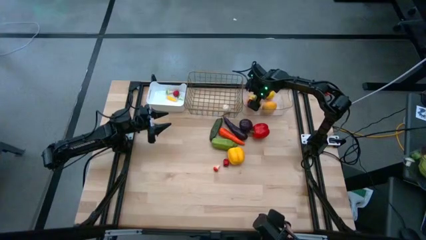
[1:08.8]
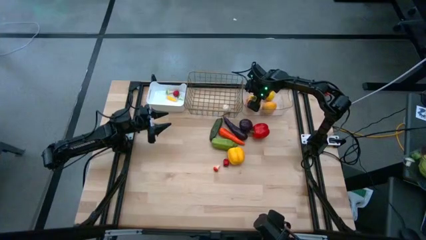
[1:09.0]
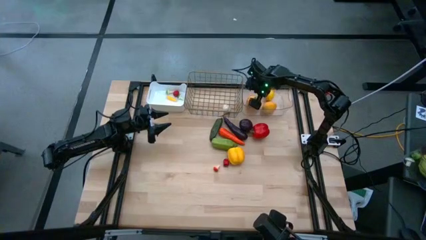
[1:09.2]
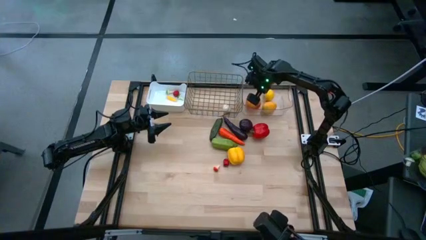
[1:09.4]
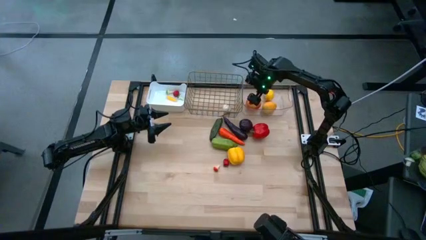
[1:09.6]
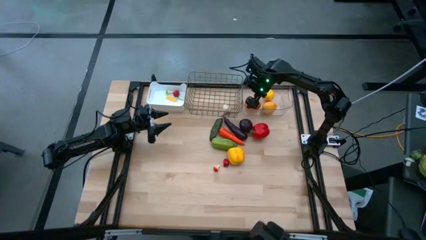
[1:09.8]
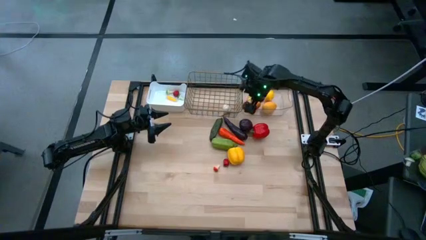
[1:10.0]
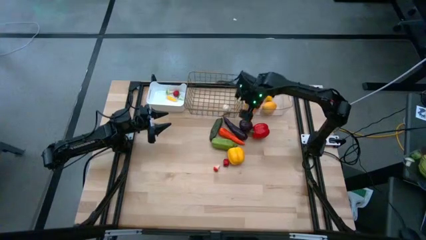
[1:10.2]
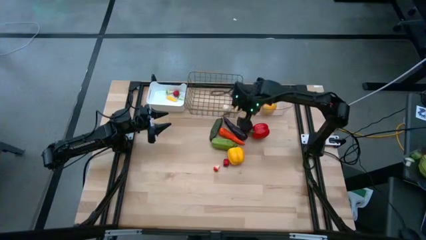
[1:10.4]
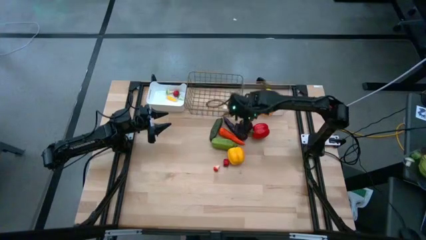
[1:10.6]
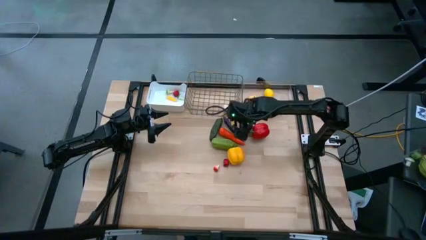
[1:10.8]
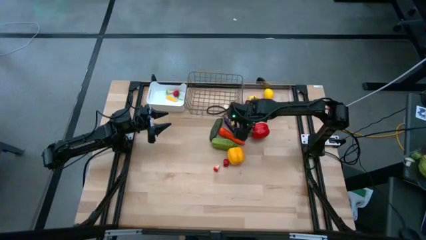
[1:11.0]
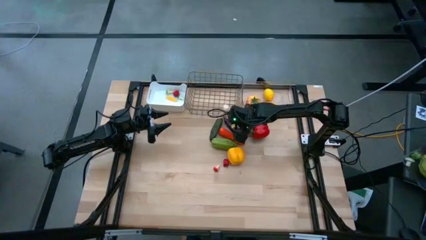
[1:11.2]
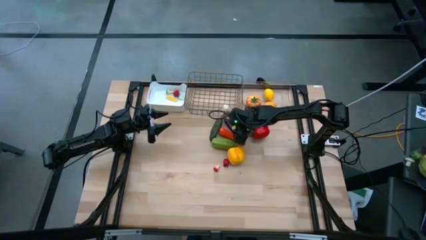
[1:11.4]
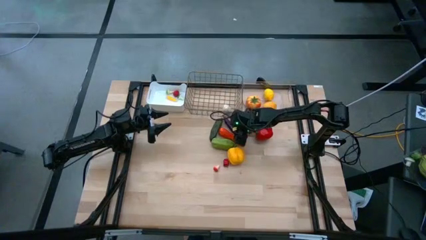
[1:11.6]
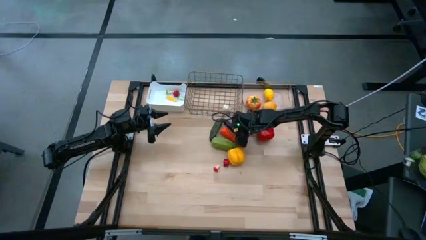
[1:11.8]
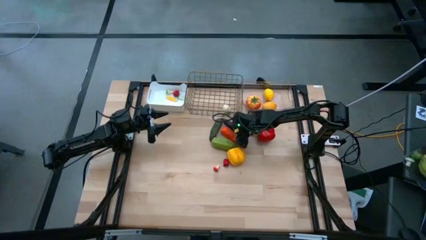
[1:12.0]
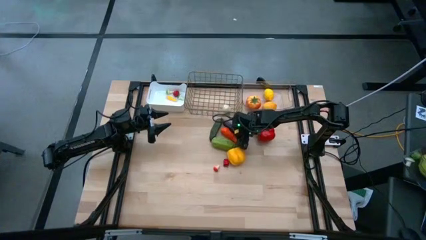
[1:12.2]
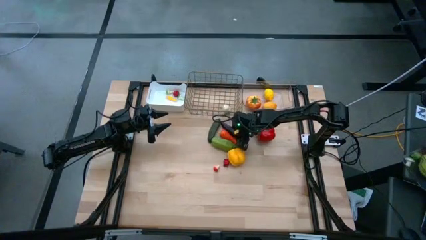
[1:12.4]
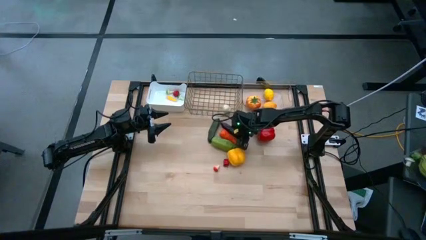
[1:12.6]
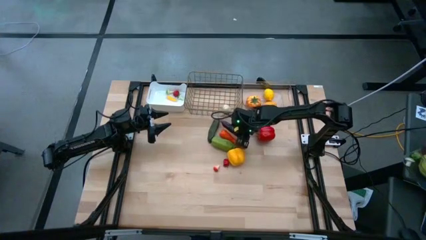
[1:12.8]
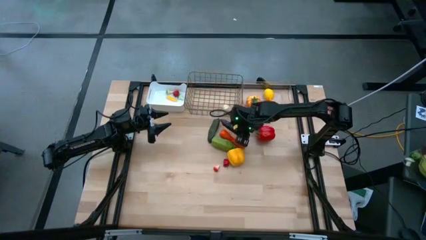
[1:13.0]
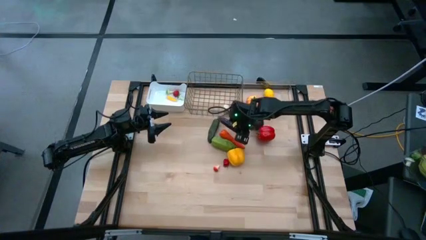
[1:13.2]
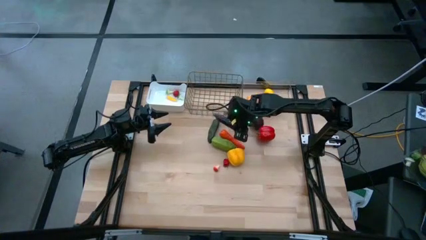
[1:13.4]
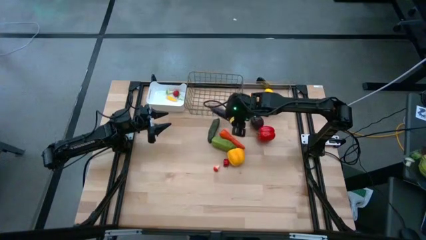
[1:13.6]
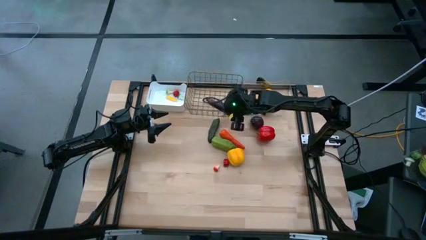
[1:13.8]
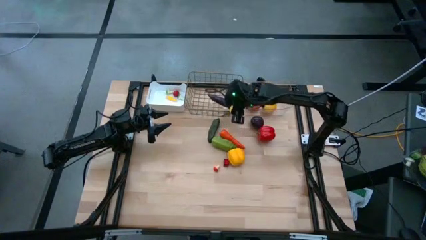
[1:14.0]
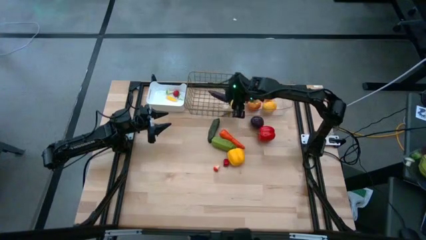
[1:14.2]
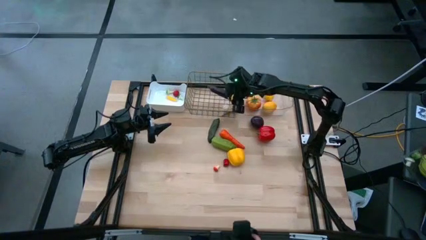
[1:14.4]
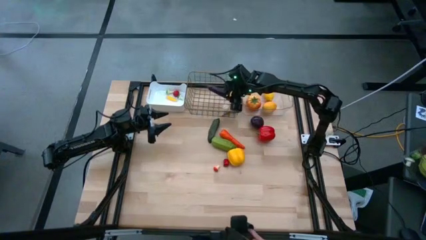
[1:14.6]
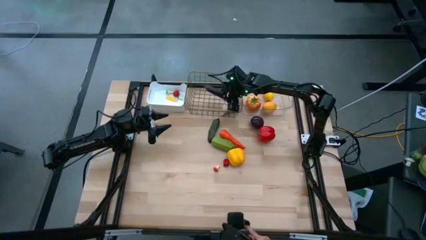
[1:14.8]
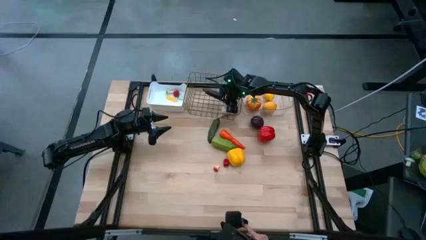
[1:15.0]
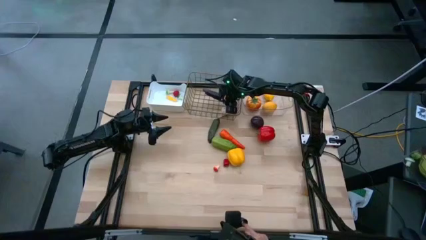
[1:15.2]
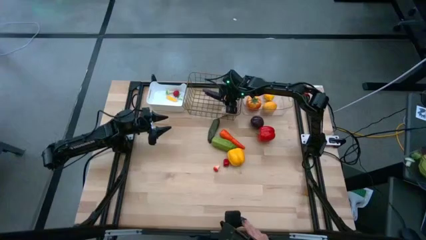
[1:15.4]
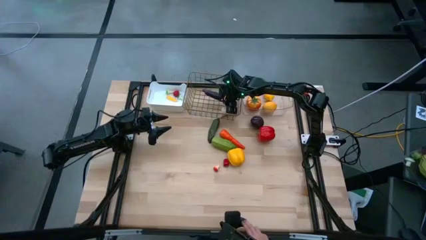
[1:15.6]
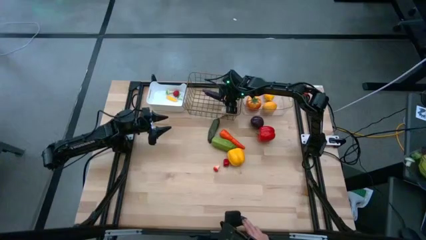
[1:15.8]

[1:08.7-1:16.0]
Task: Sort produce into baskets
Put the eggplant into the wire basket

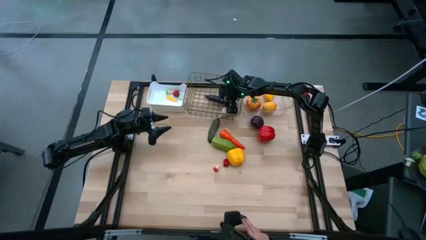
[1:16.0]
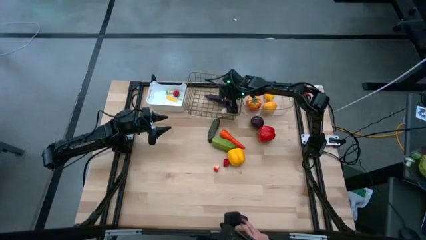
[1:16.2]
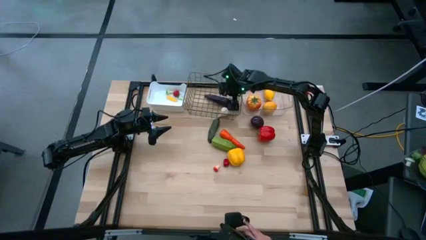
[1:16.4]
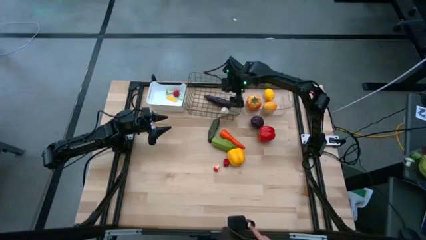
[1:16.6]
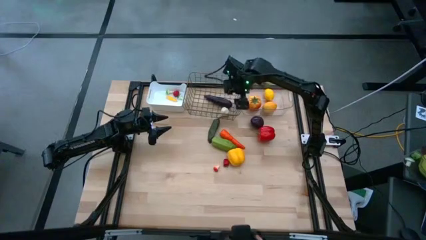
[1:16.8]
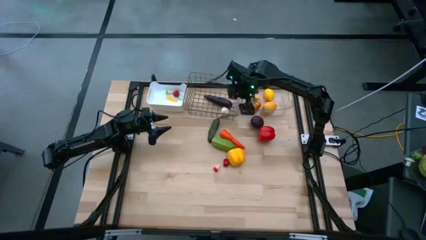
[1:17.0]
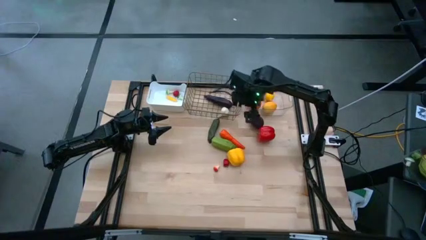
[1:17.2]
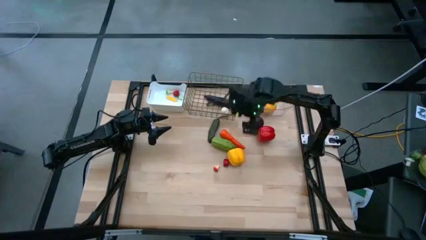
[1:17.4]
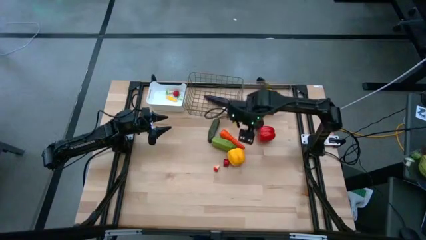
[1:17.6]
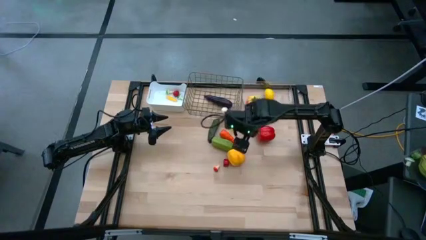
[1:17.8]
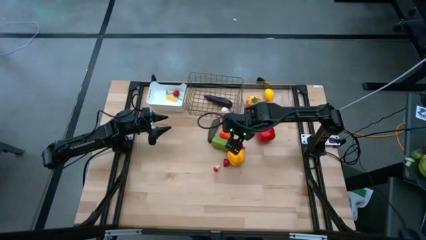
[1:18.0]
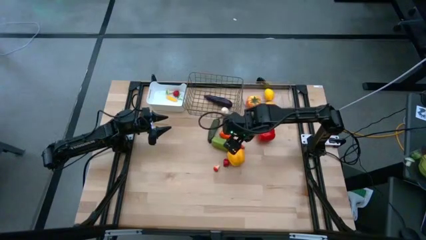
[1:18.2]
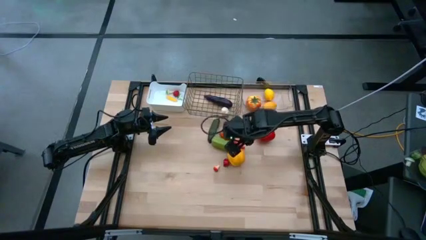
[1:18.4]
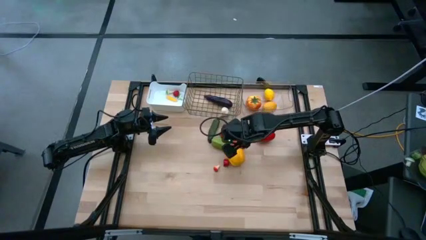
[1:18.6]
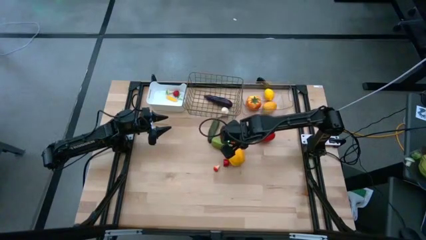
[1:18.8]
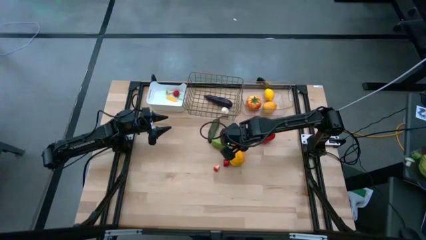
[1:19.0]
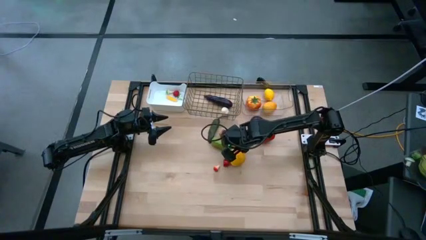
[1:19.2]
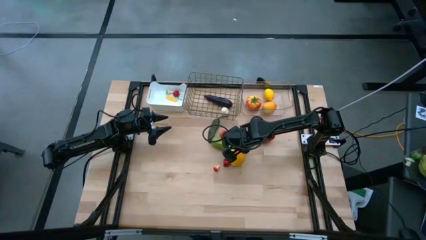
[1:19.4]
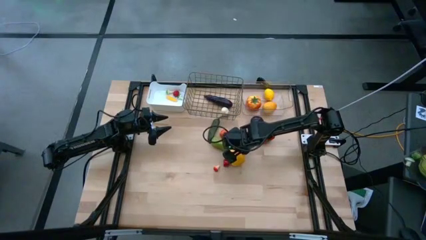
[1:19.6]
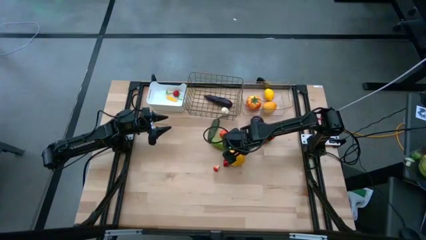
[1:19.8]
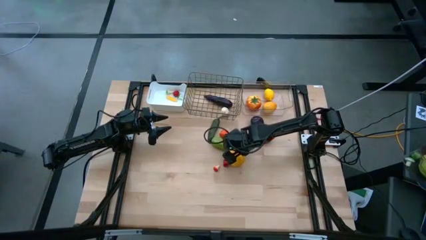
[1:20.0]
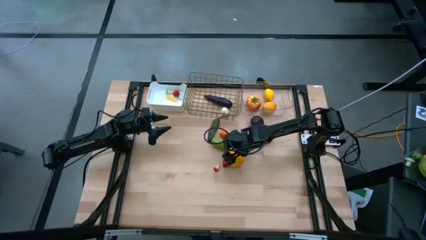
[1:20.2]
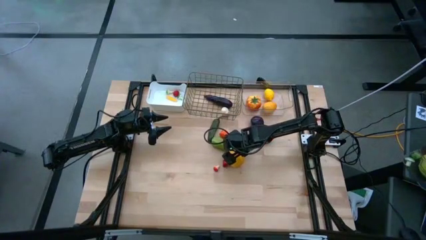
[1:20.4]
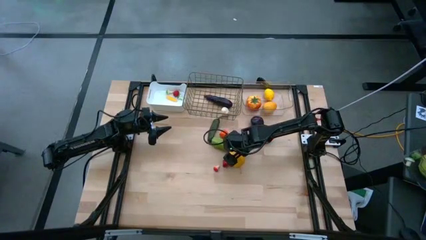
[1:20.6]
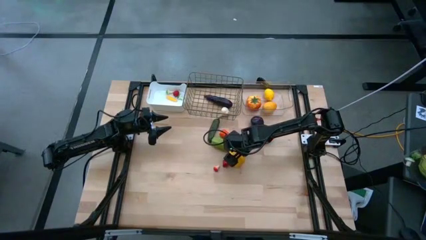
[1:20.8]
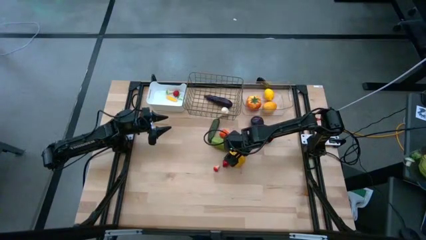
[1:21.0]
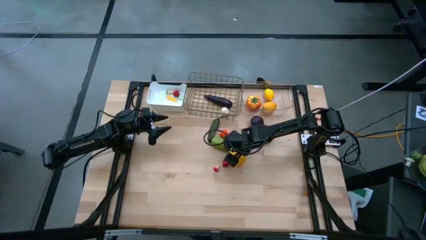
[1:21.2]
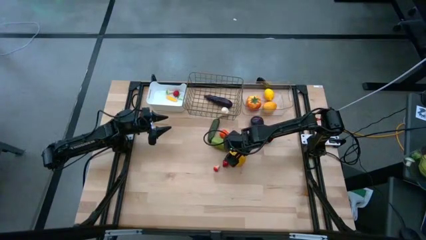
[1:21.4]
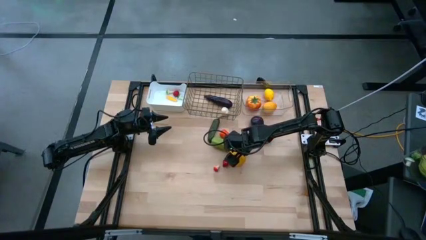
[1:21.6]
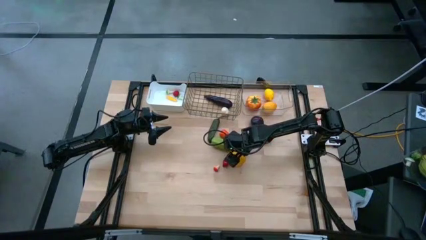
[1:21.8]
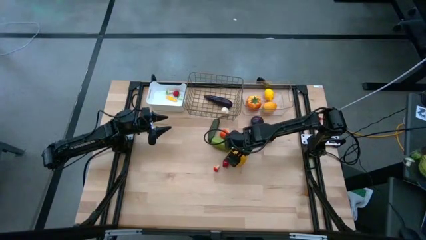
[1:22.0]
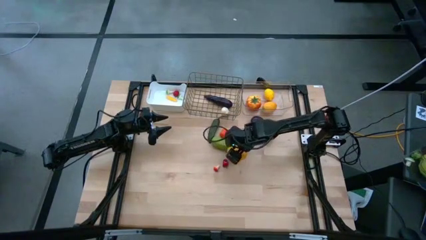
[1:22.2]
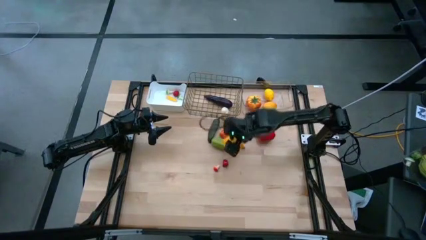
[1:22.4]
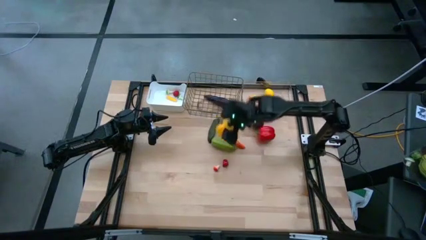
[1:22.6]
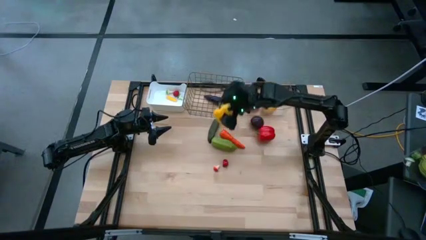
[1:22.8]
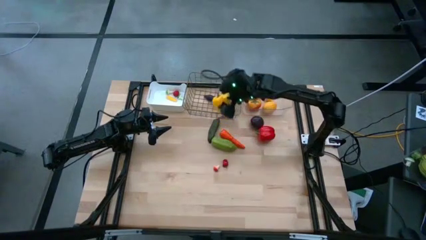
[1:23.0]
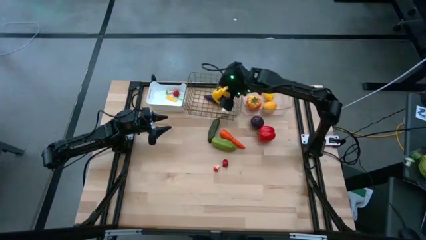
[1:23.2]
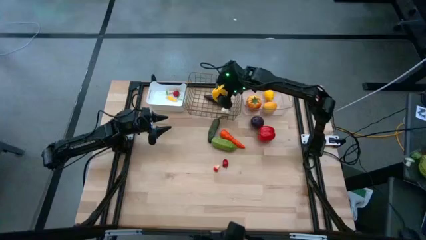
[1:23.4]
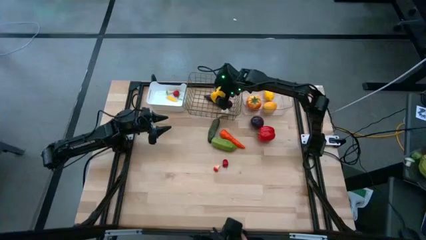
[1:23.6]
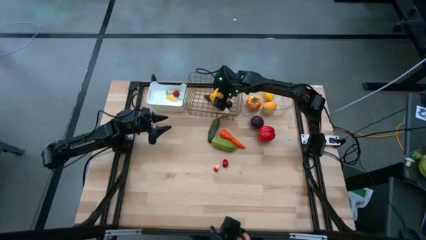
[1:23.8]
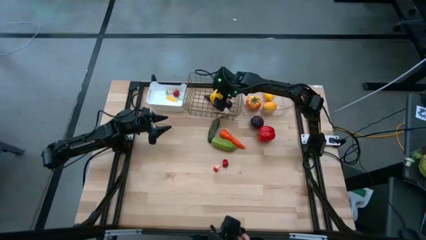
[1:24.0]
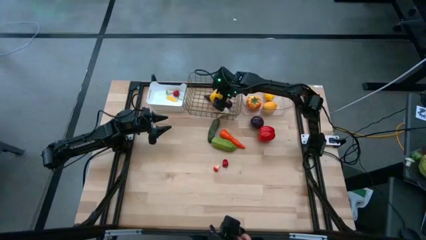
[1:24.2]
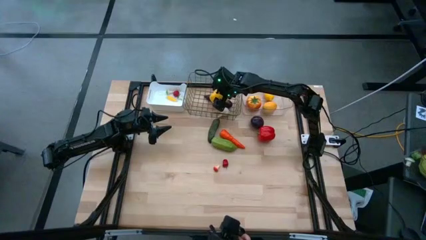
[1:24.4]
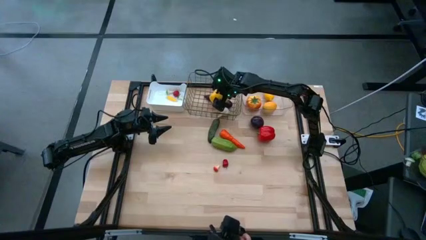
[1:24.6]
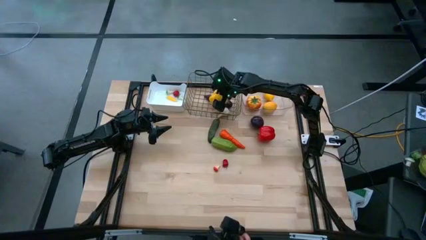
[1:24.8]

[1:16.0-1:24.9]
Put the yellow bell pepper into the wire basket
